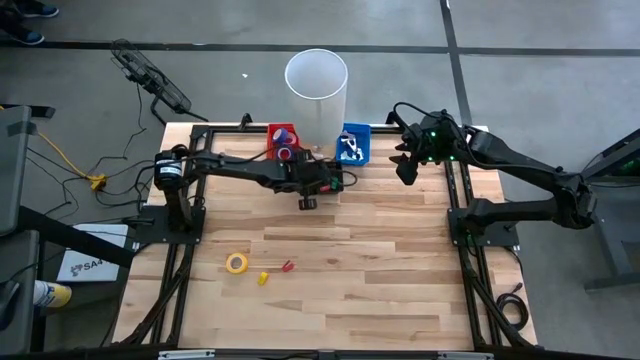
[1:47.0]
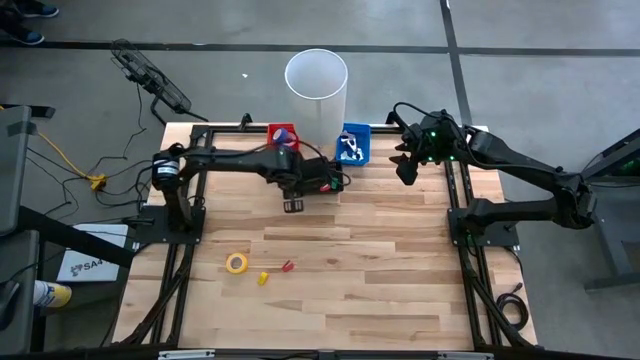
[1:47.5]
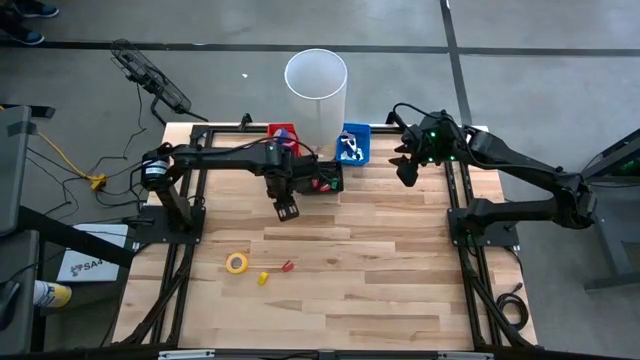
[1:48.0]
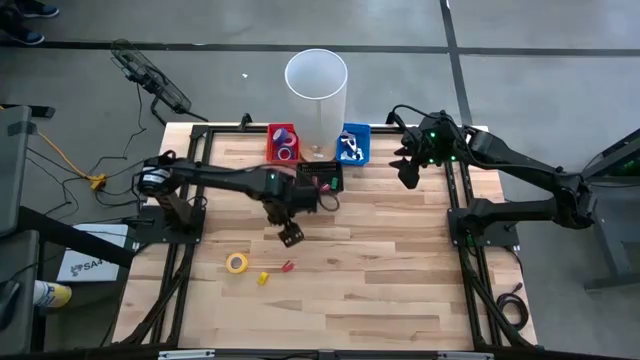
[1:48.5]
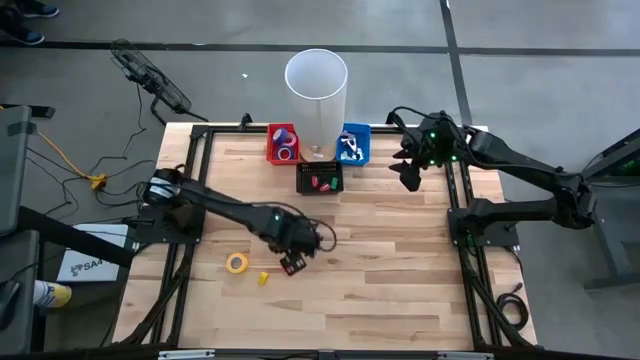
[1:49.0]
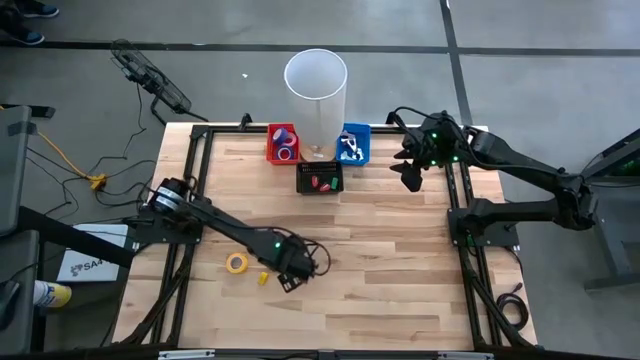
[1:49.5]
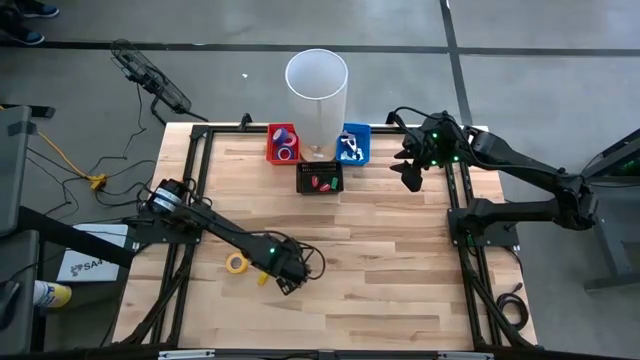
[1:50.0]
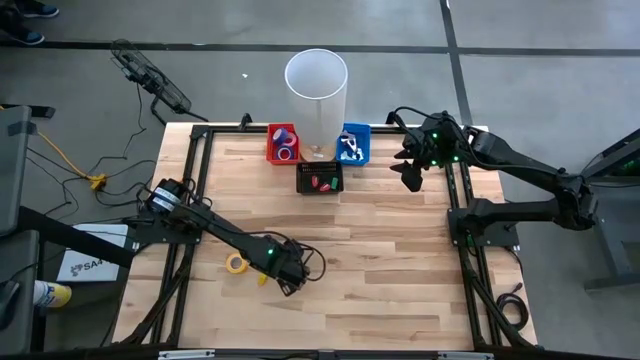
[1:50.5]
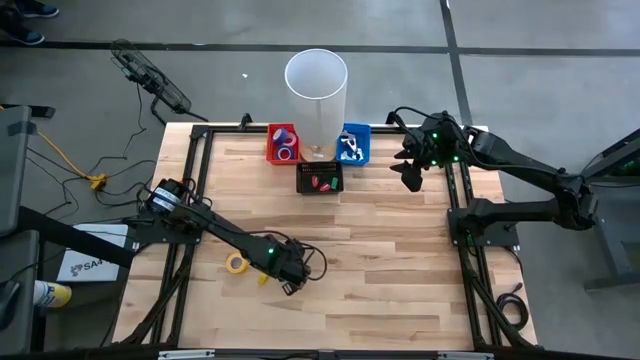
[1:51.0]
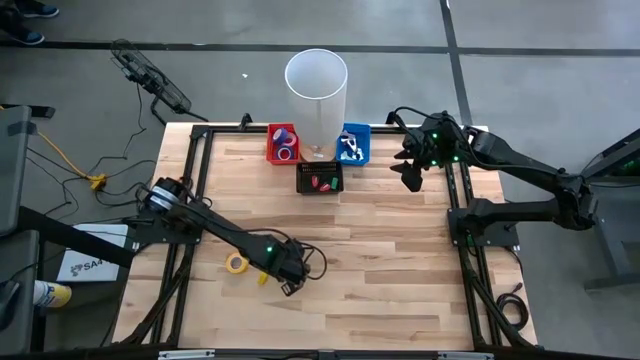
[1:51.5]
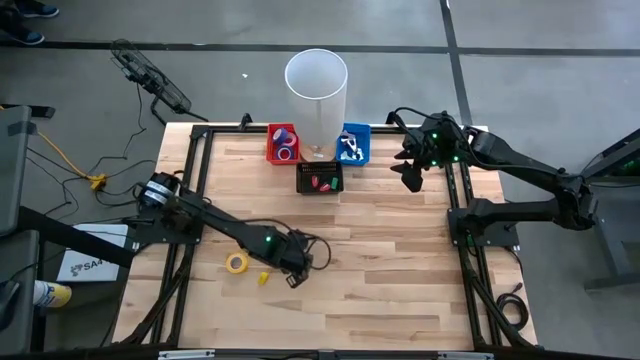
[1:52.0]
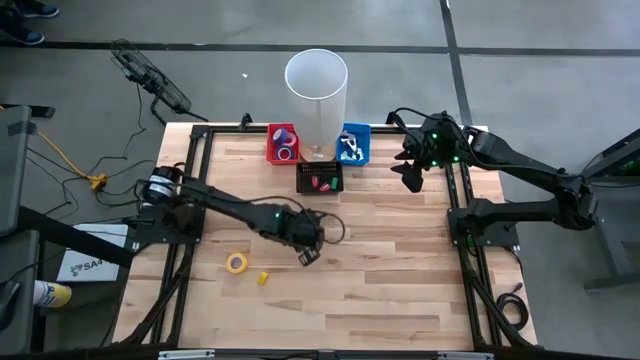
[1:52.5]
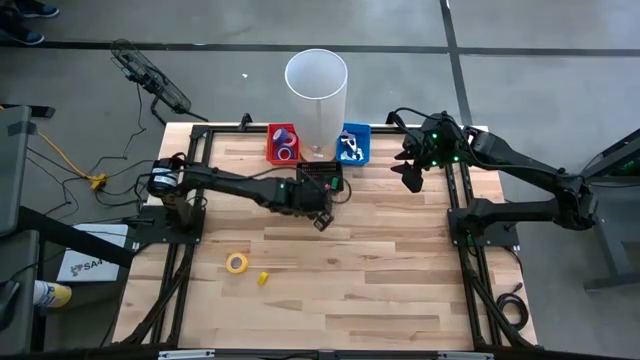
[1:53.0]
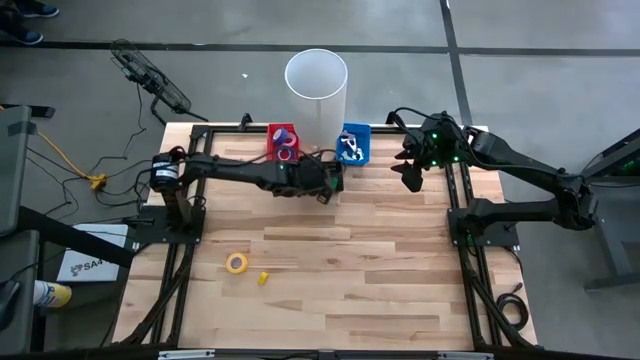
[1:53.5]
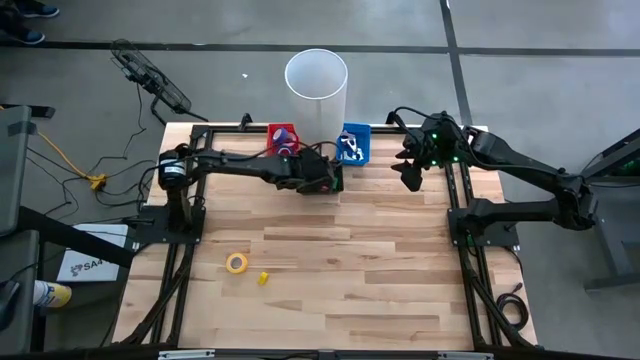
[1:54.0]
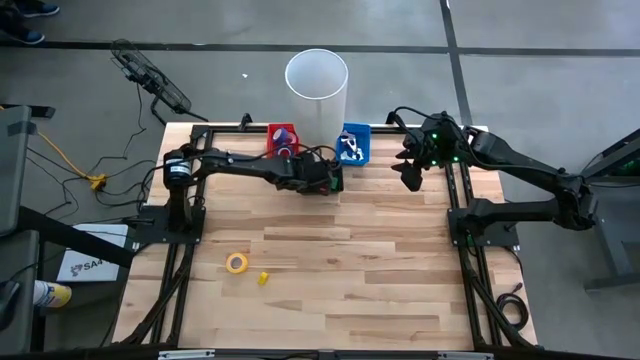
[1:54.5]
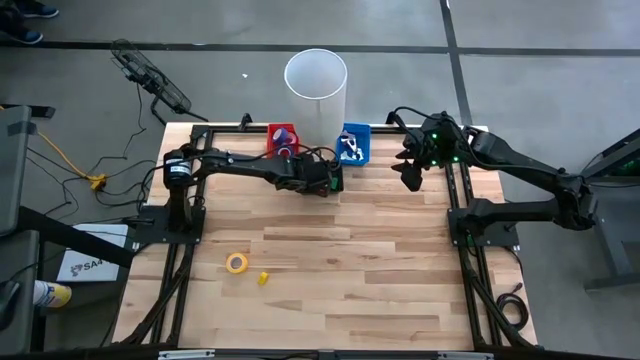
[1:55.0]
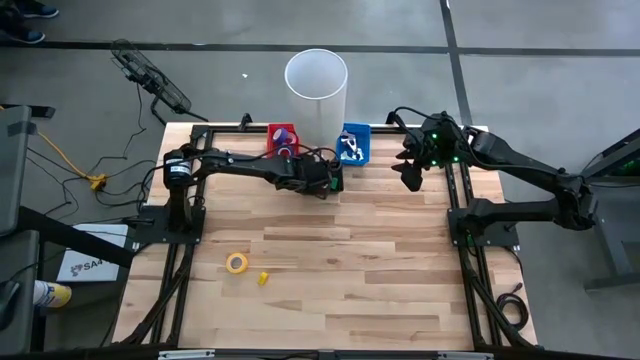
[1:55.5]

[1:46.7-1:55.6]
Task: Pick and place Stapler, Stapler remover, tape
Put the red mini stapler into the black bin

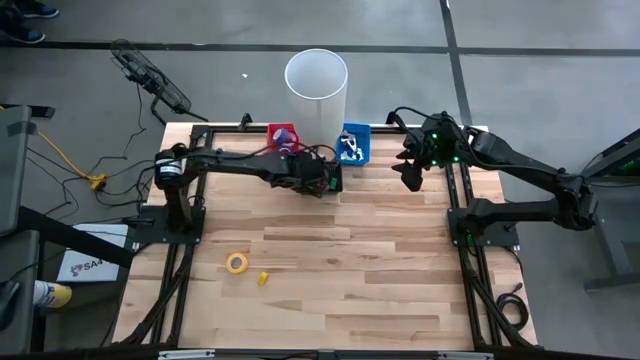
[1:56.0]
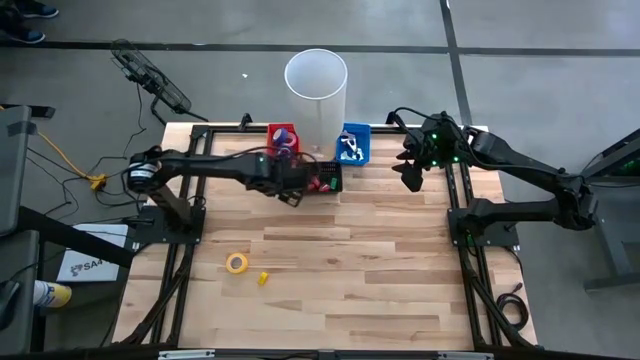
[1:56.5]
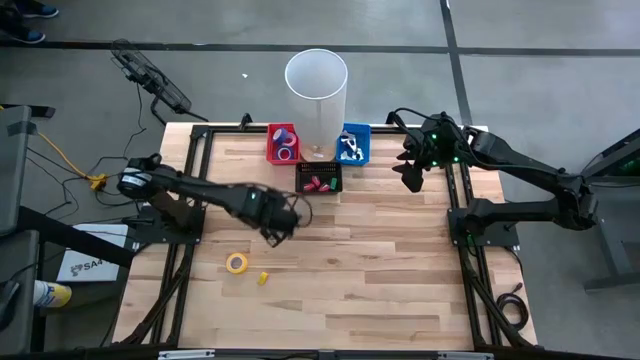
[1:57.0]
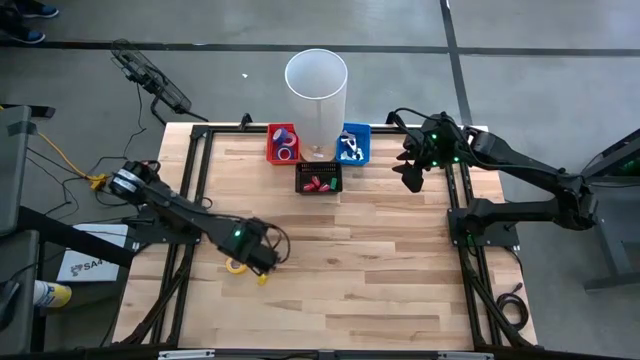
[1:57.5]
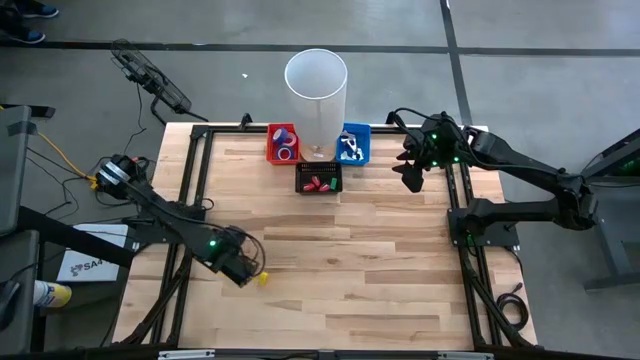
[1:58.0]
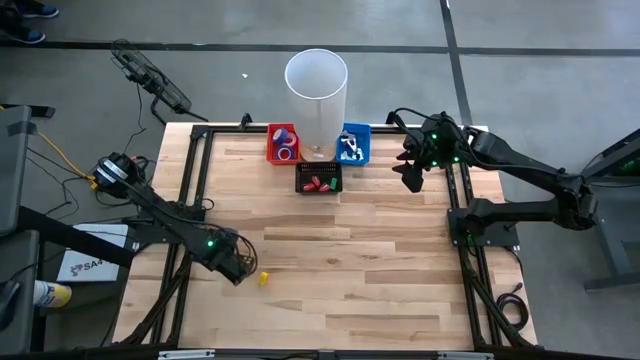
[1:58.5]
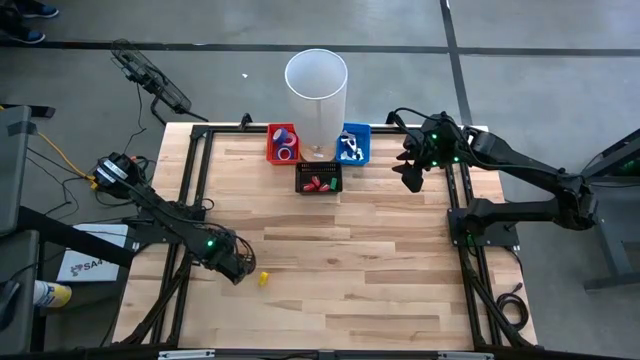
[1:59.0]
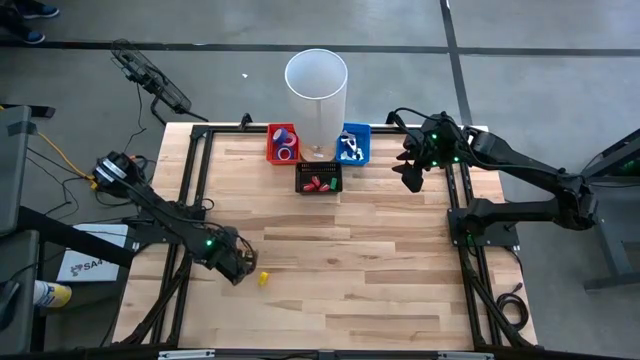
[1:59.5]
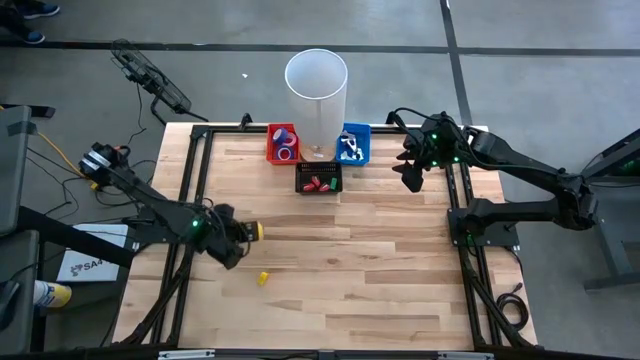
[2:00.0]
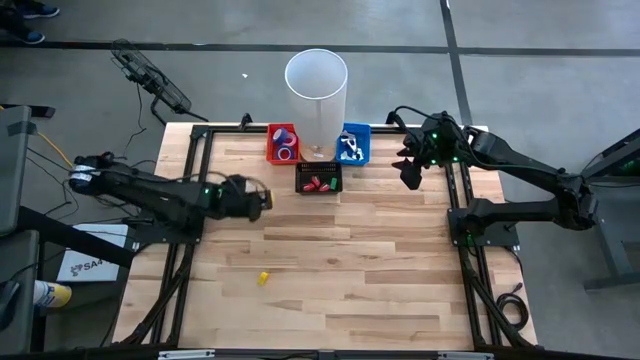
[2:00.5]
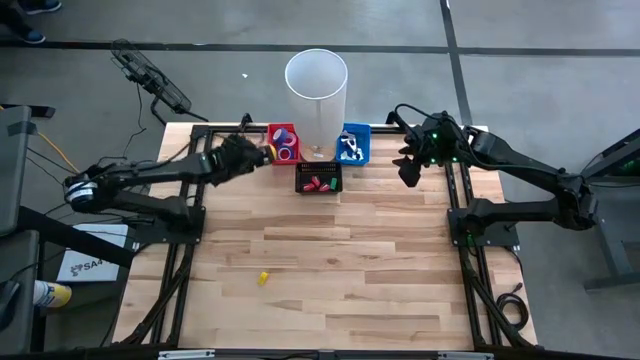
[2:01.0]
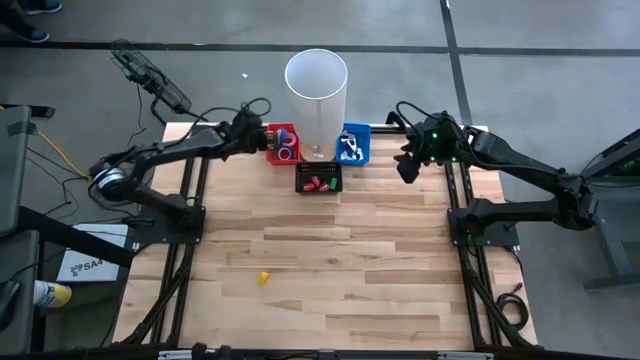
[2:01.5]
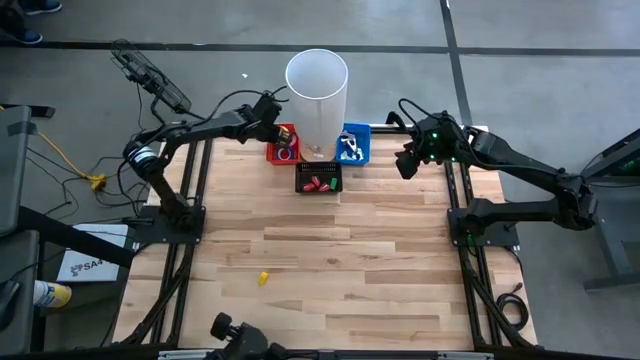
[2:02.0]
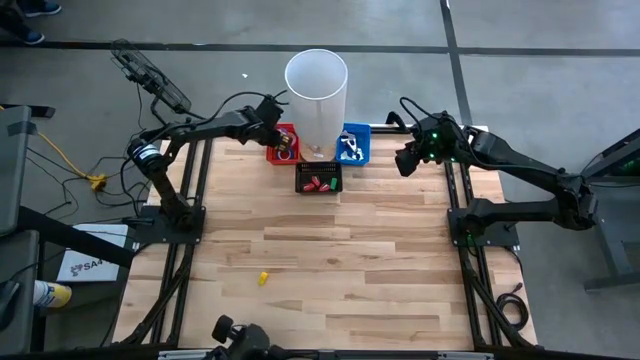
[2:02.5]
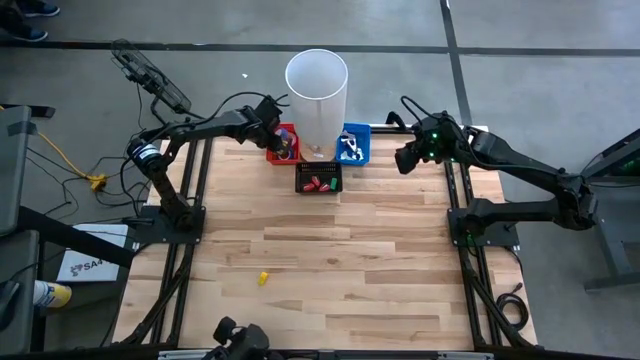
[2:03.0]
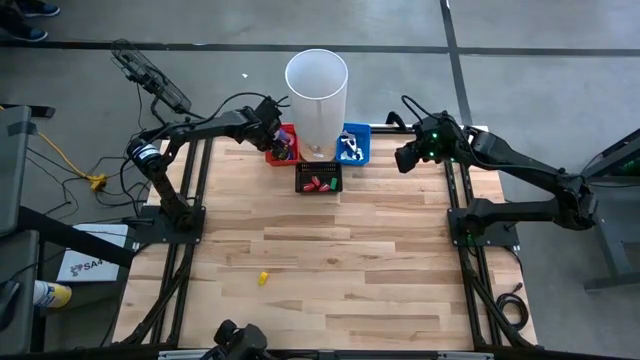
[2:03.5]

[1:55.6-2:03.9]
Put the yellow tape into the red bin

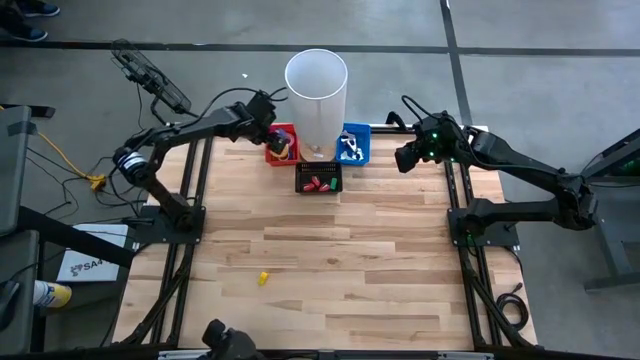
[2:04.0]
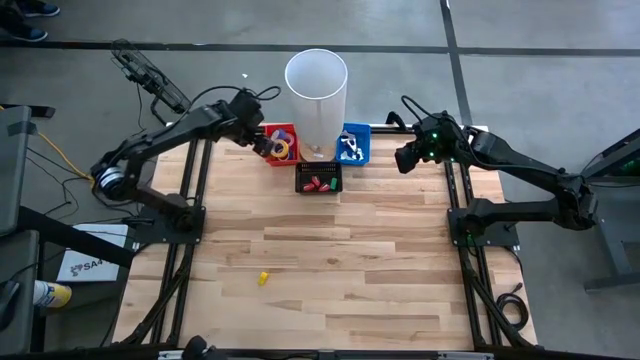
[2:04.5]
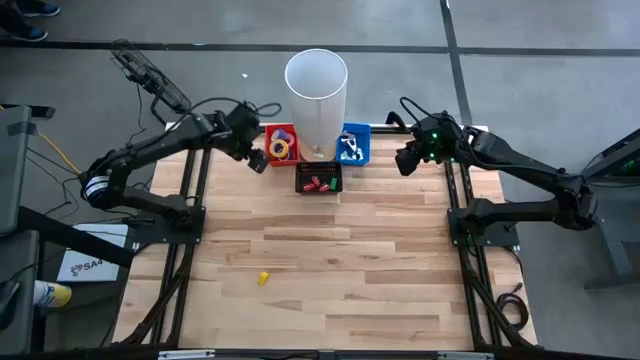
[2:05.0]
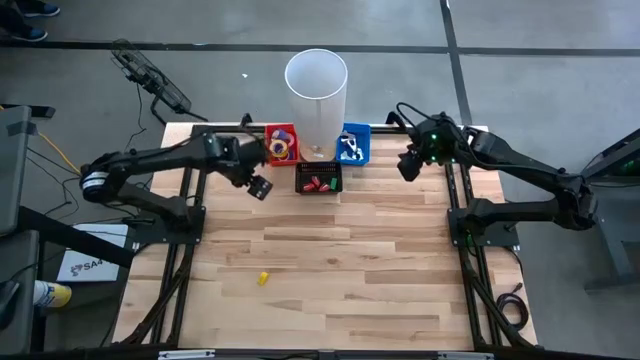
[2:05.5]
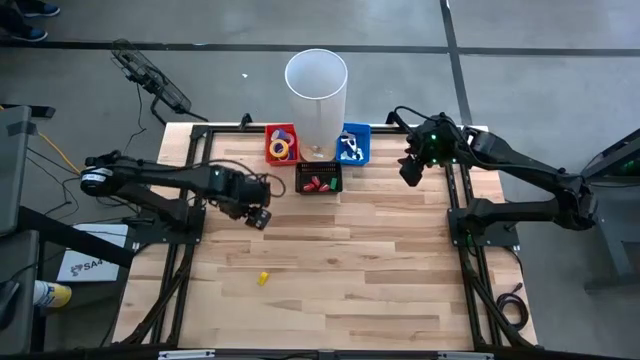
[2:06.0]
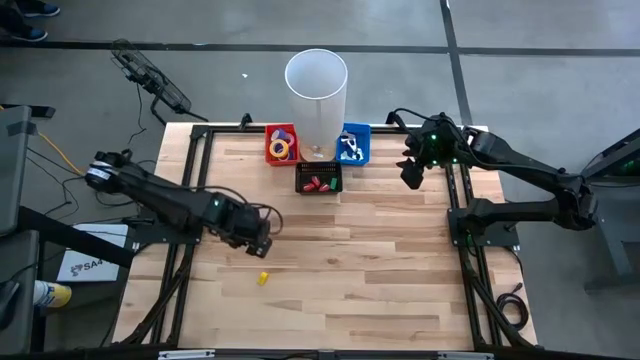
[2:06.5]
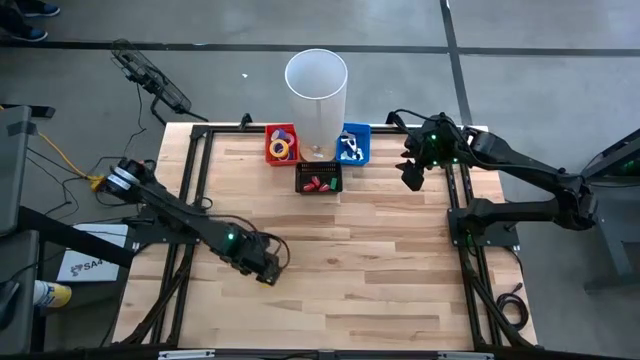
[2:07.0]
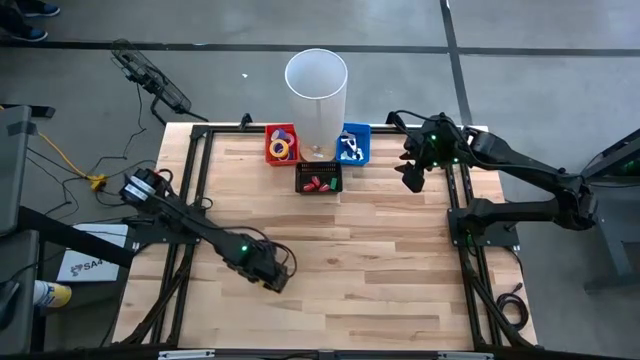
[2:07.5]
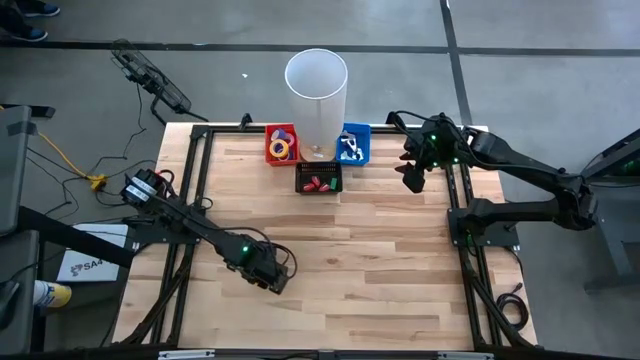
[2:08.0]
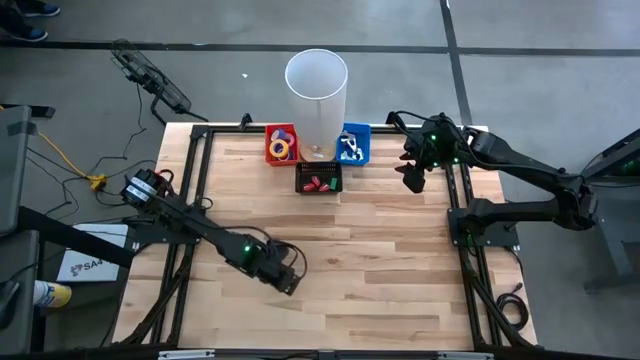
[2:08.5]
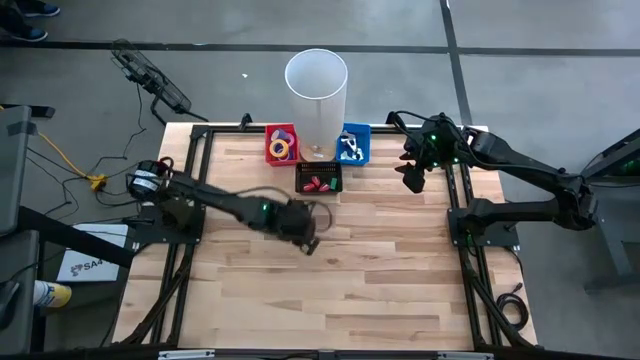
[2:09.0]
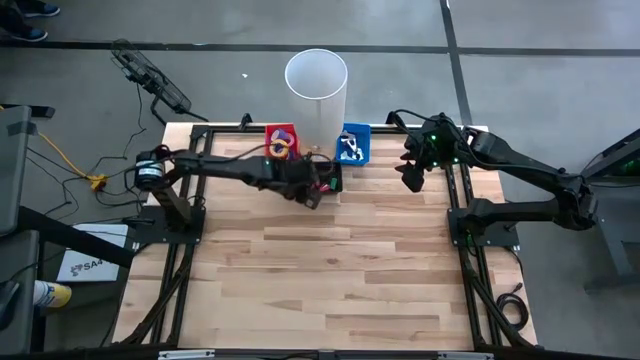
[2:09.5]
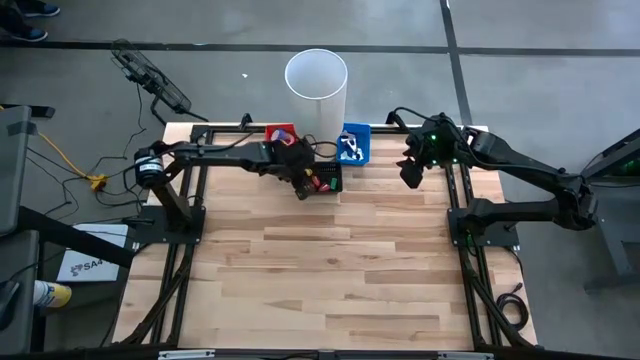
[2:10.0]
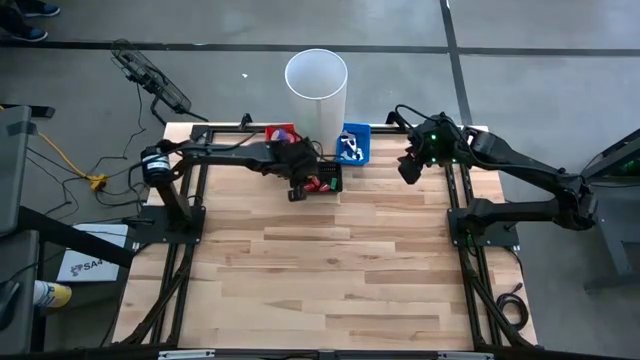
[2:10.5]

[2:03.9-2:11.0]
Put the yellow mini stapler into the black bin
